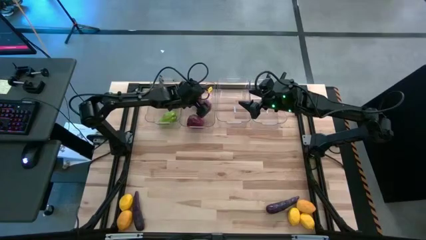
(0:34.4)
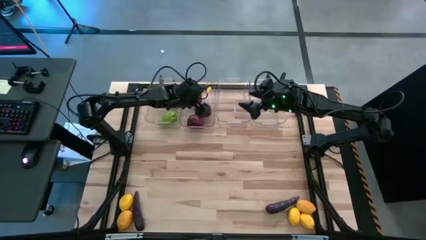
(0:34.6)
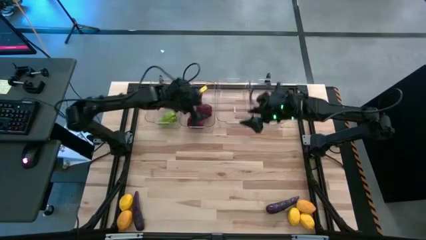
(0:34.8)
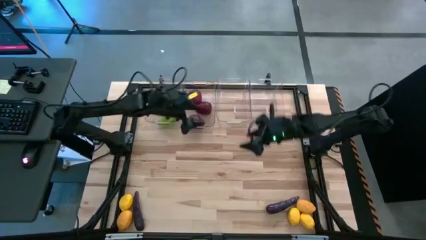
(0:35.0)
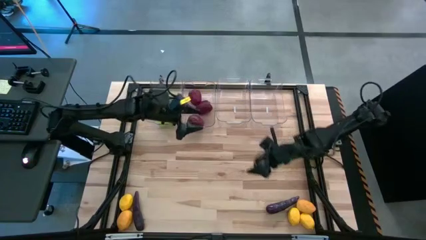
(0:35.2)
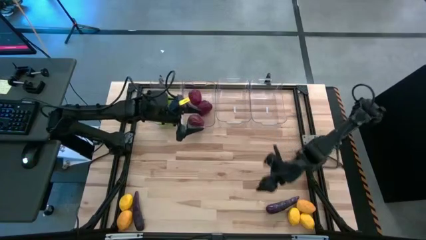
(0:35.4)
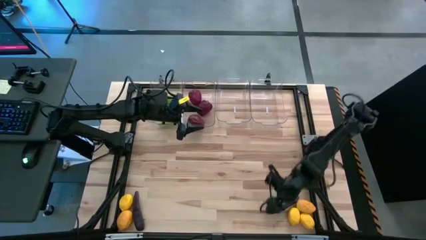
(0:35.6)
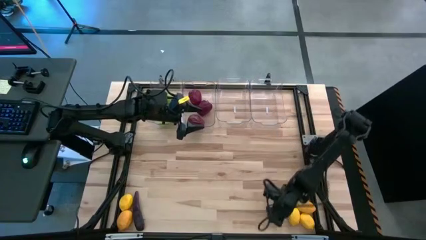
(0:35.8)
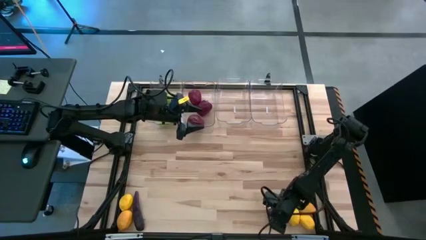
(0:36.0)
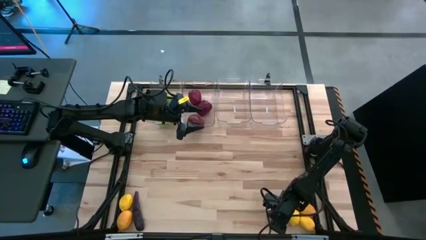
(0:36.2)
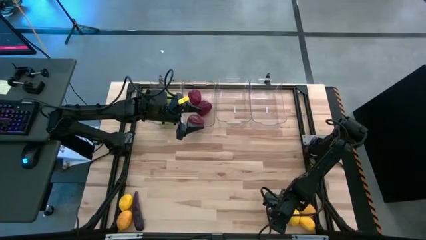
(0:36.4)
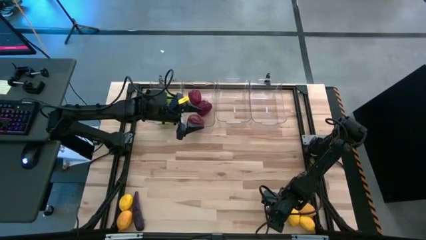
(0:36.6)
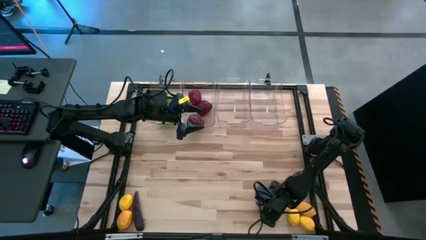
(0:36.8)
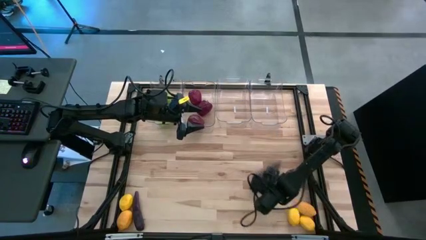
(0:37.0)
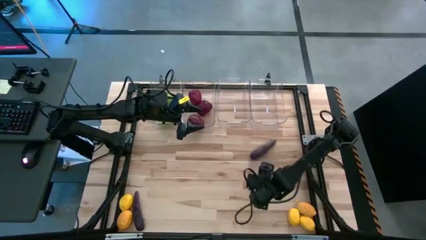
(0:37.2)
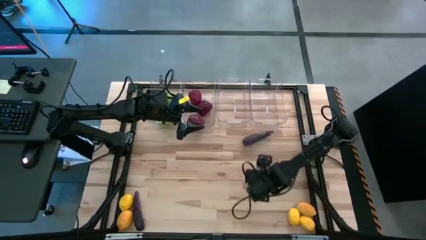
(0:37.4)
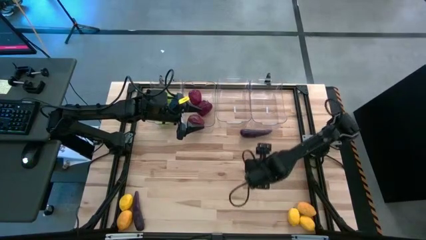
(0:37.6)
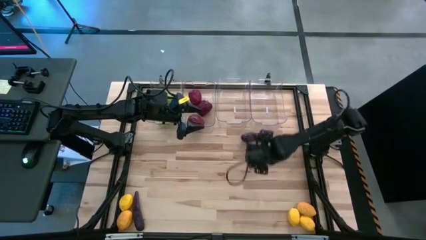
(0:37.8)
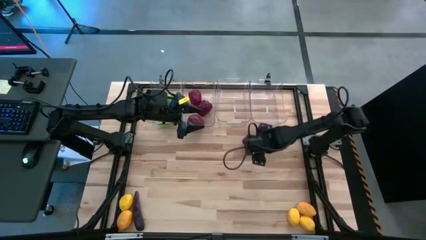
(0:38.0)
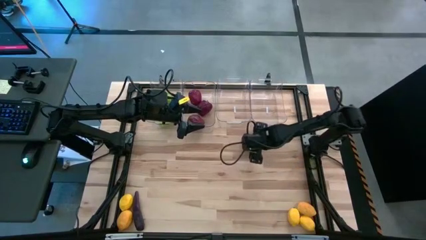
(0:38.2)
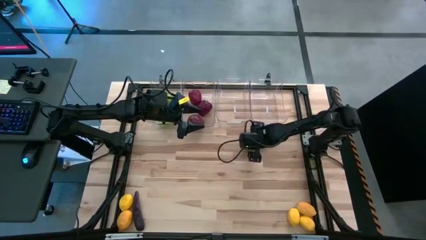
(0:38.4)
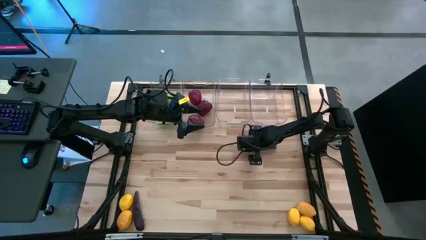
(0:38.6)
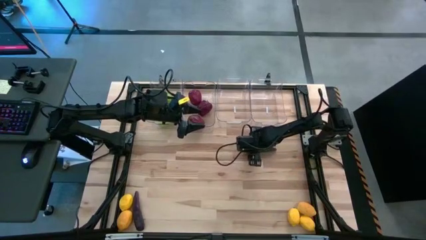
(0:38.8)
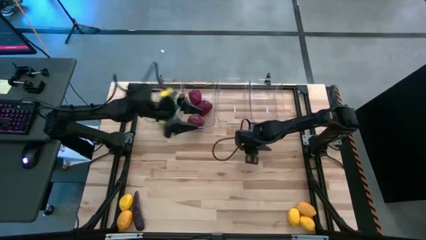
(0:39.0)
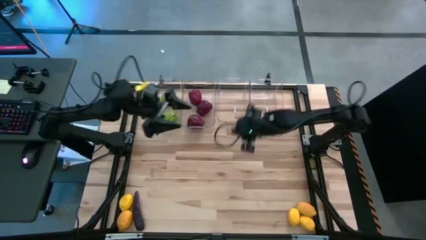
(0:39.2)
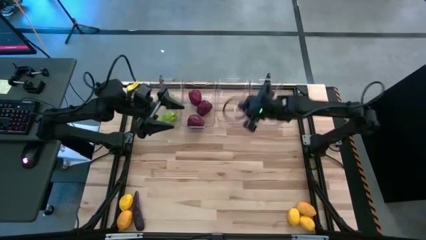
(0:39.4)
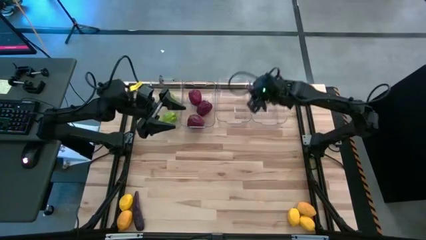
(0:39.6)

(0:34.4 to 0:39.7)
Task: Sort produce into baskets
Put the eggplant into the right transparent bin

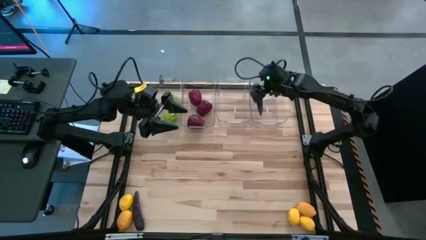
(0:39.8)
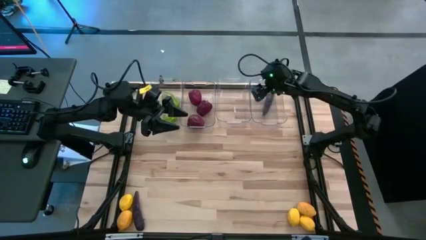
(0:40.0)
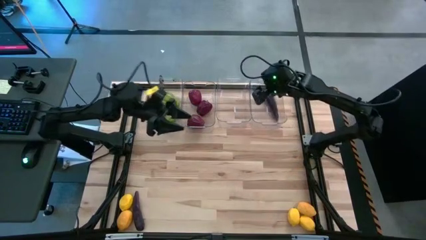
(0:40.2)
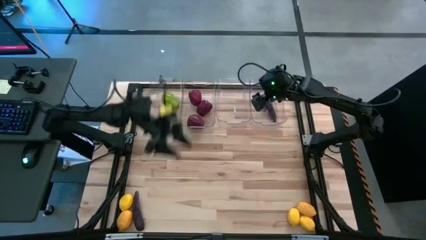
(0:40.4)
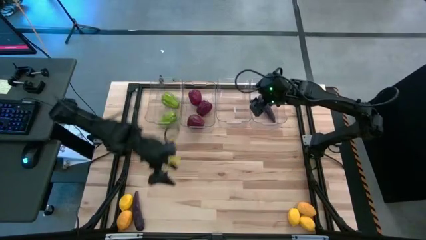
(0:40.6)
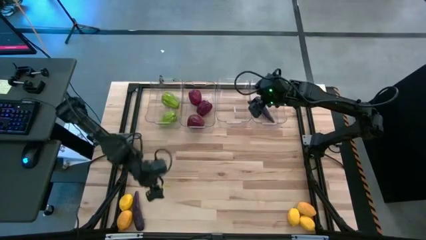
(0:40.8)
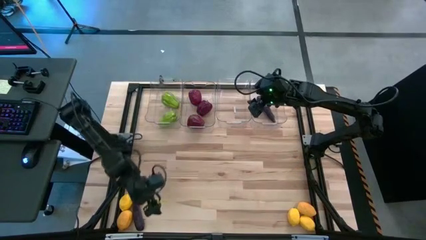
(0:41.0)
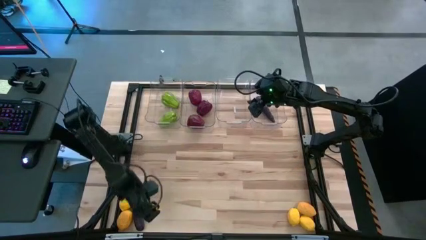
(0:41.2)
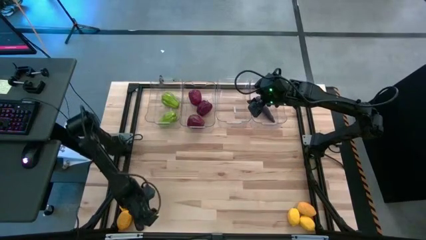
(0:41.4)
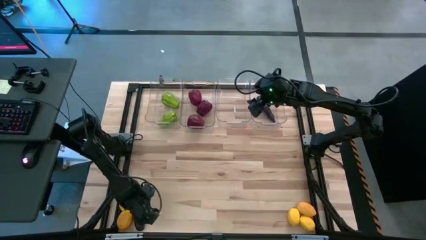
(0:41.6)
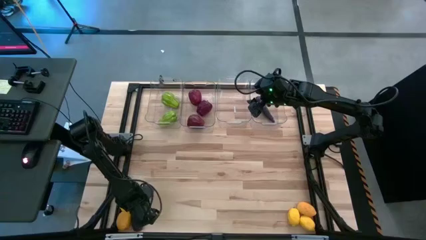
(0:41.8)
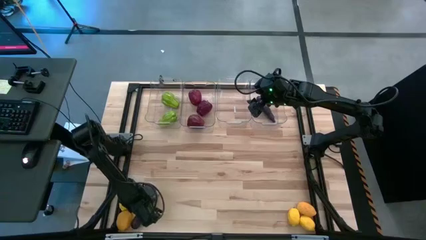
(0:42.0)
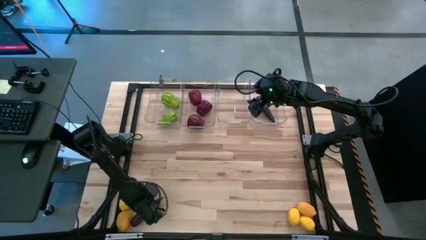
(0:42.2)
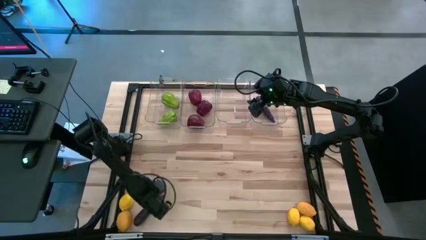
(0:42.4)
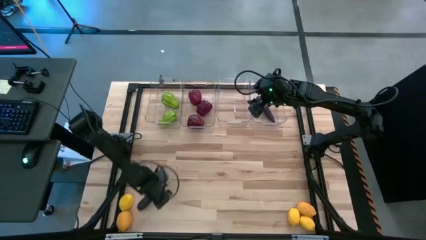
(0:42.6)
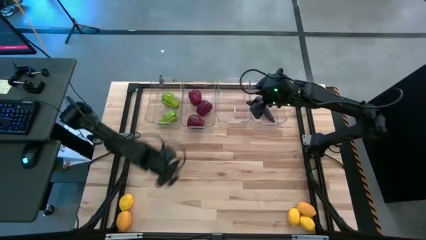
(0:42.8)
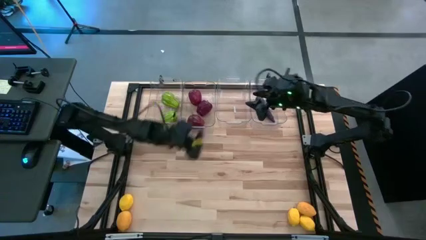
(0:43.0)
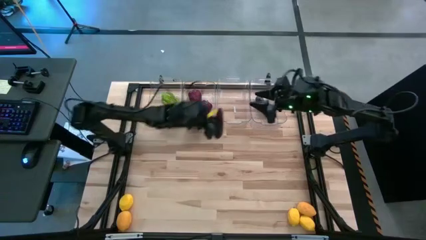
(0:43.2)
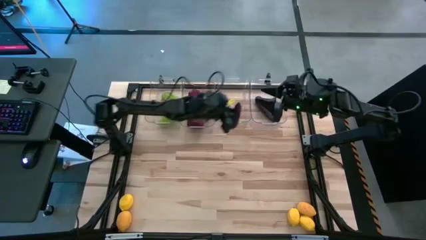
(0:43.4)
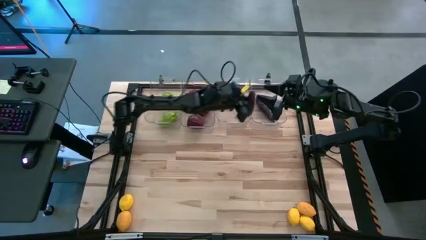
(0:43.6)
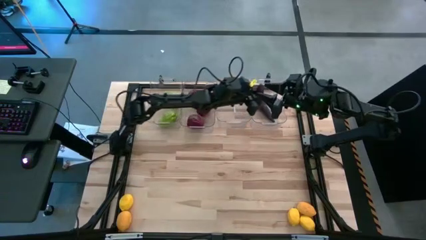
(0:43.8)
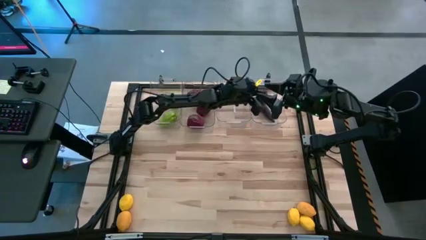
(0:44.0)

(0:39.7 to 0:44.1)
Put the eggplant into the right transparent bin

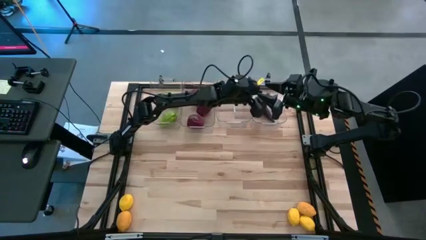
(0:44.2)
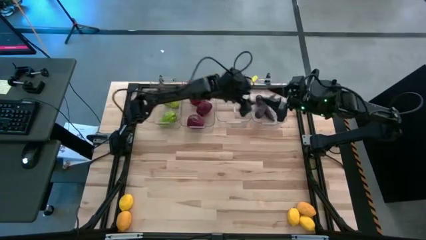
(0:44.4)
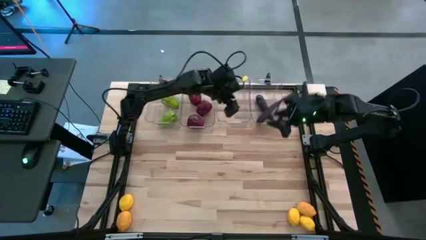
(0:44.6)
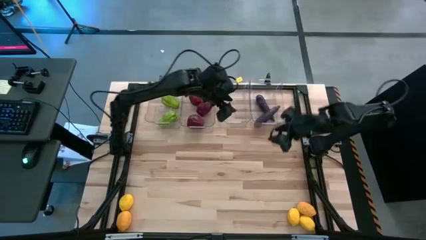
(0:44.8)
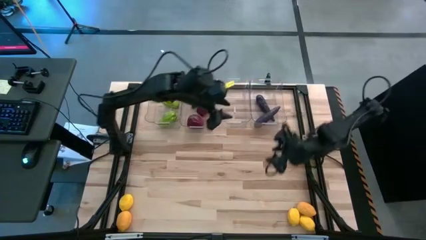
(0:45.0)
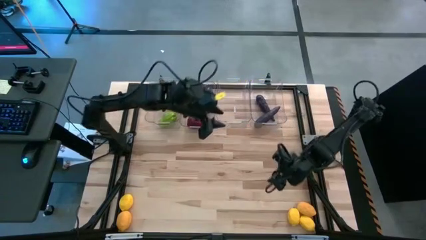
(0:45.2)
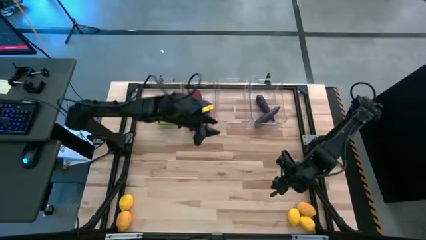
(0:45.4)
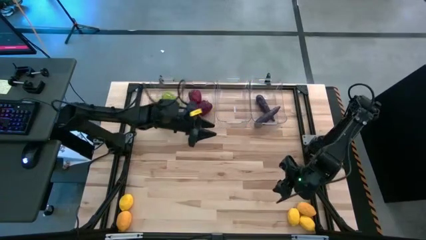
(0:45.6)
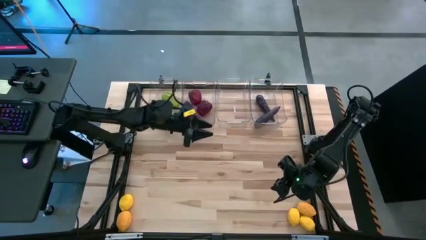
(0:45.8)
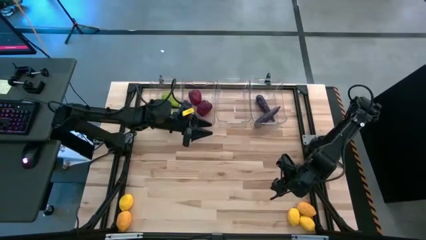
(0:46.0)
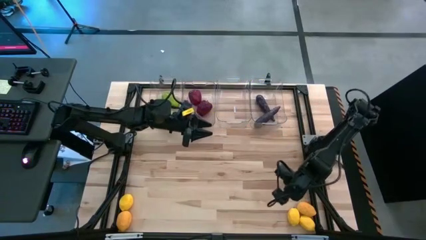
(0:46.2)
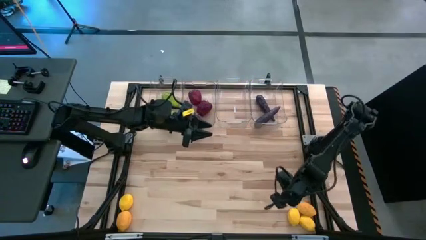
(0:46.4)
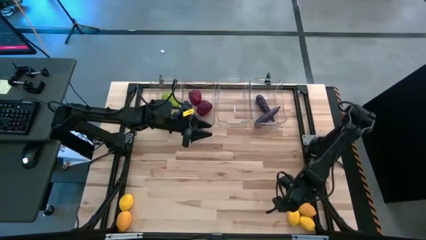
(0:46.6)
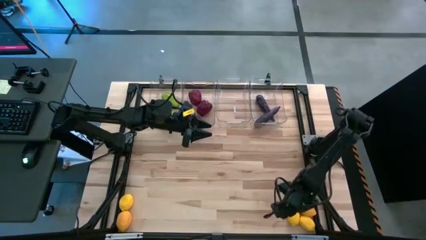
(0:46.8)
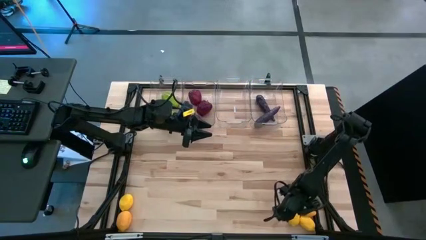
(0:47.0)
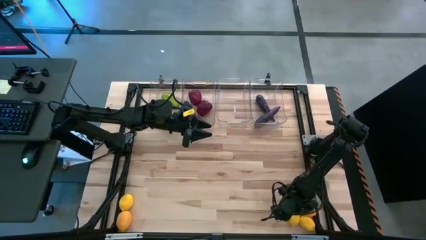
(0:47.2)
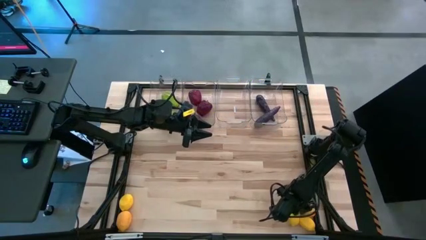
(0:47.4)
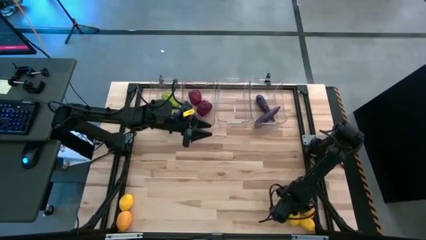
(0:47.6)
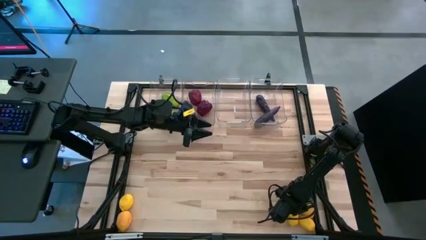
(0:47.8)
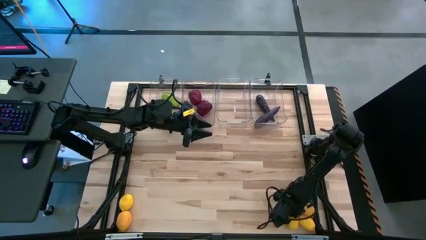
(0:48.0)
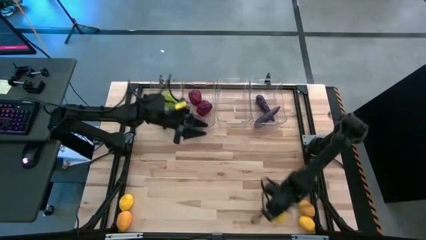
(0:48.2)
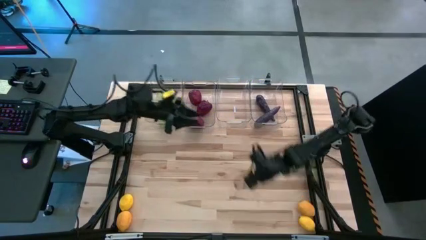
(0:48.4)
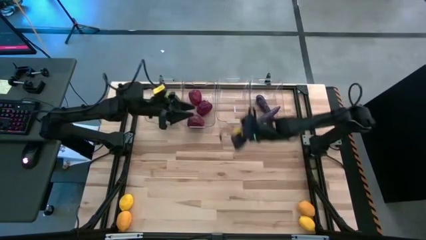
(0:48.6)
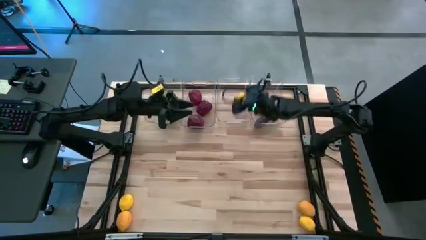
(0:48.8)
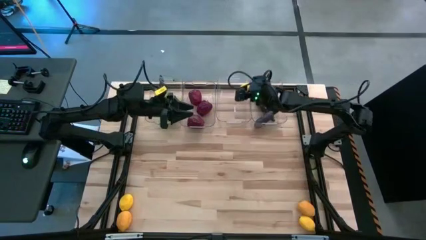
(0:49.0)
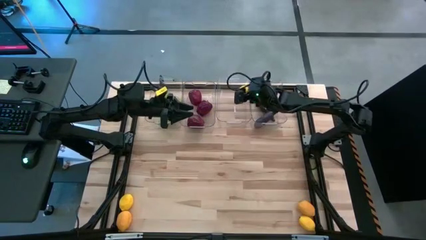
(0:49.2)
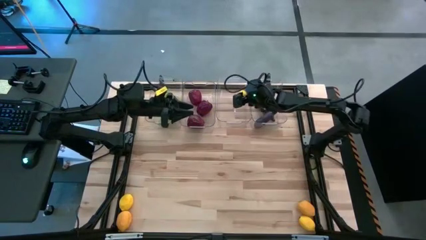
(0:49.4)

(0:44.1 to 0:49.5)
Put the yellow lemon into the middle right transparent bin

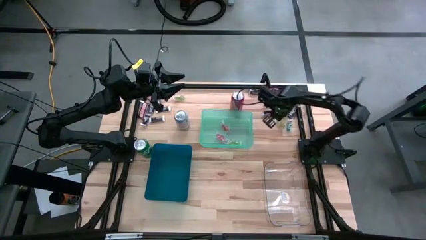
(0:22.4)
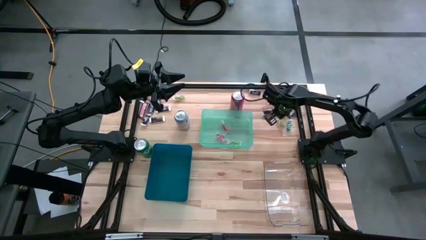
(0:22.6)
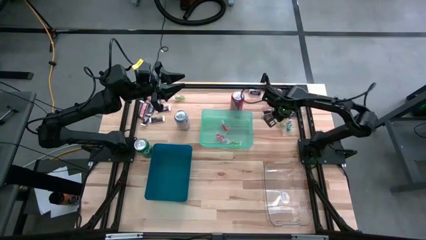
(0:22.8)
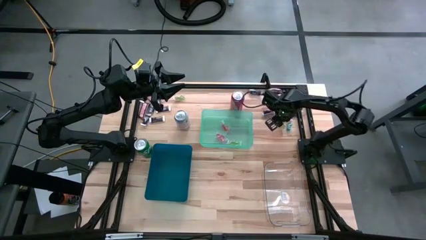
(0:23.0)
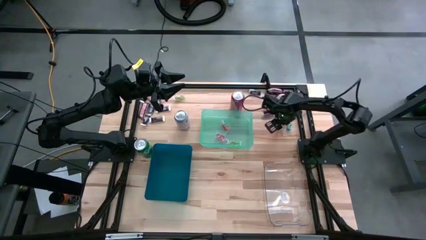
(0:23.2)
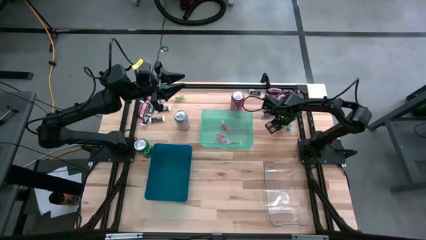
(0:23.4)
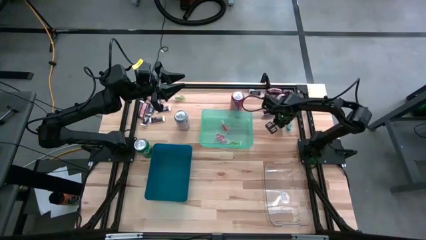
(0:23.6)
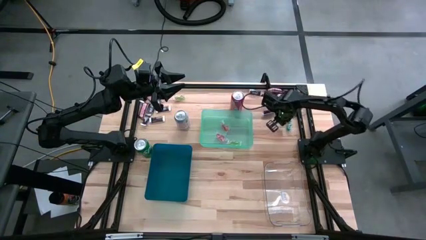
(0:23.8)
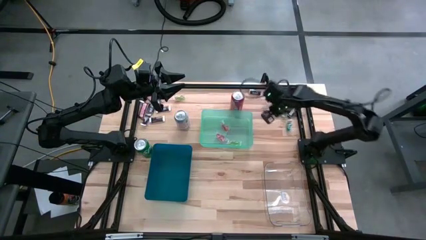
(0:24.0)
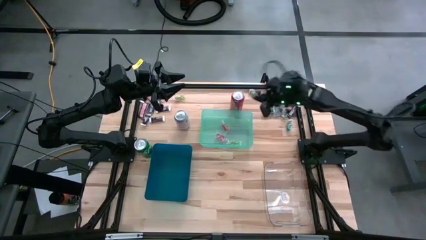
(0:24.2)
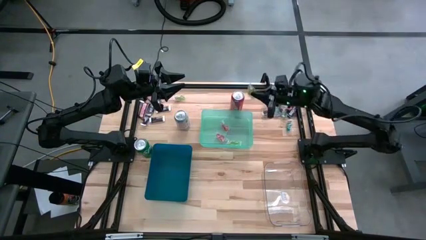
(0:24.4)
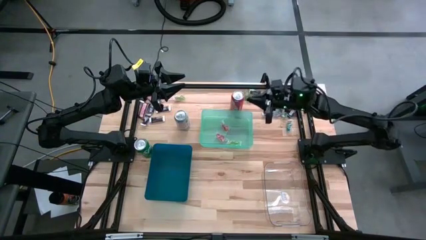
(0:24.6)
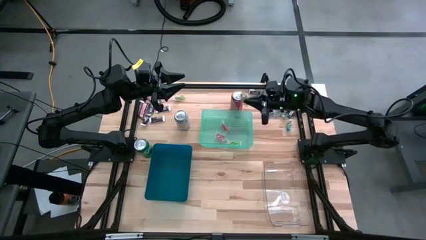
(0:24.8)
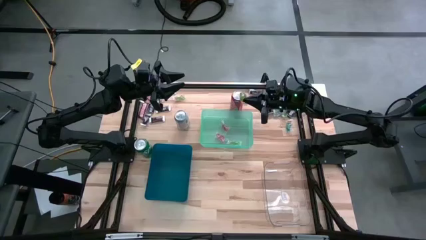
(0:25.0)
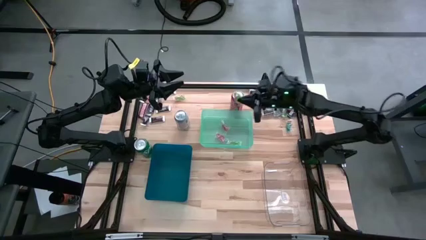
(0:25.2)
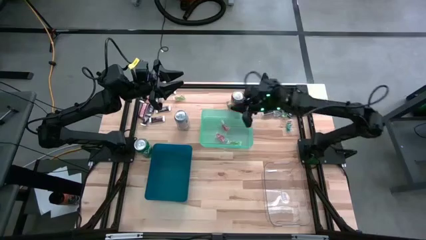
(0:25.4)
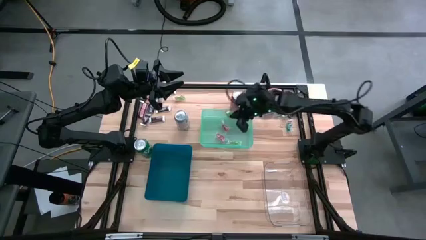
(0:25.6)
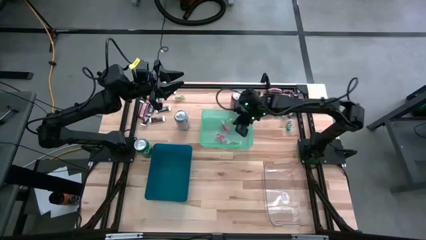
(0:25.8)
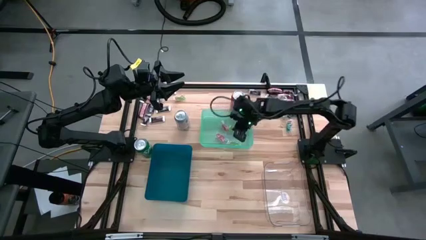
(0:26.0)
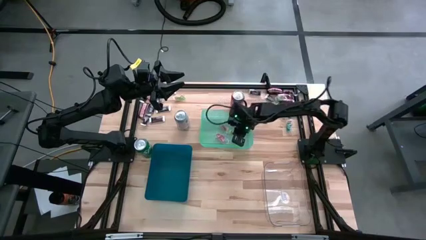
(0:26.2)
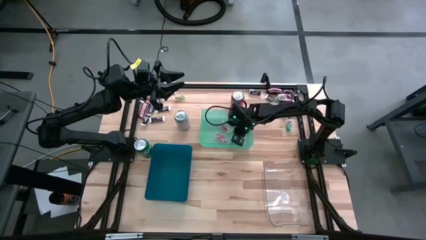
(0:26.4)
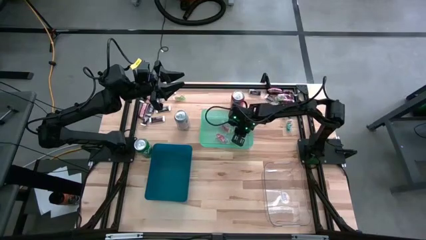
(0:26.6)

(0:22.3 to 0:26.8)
Task: Organize candy in baskets
Put the green gummy into the green bin
